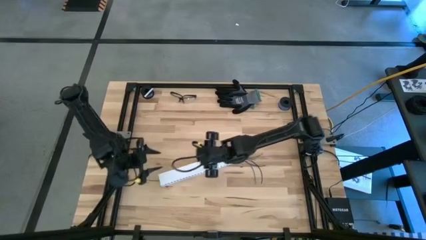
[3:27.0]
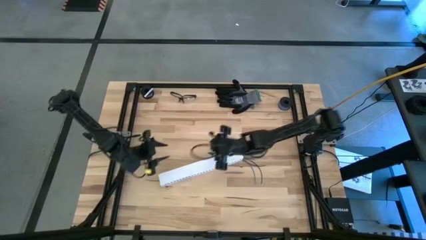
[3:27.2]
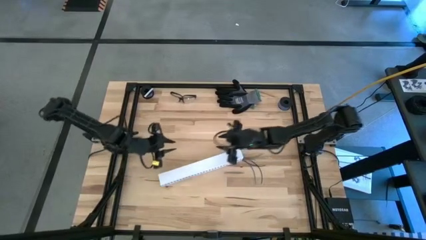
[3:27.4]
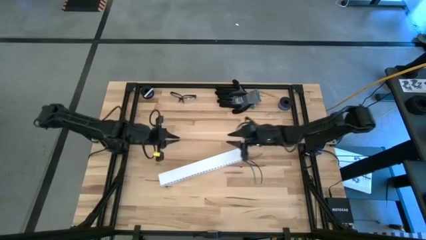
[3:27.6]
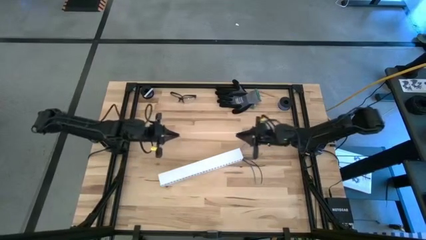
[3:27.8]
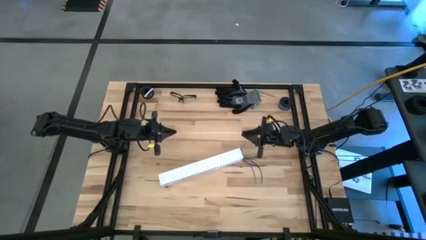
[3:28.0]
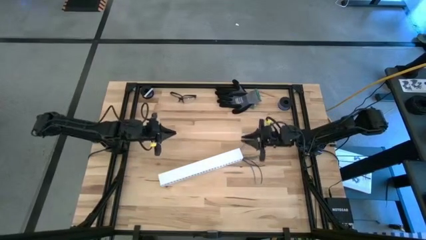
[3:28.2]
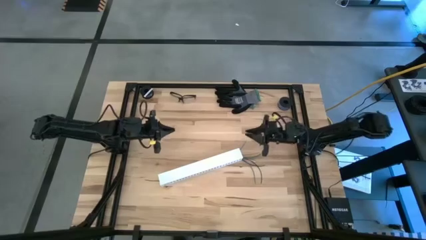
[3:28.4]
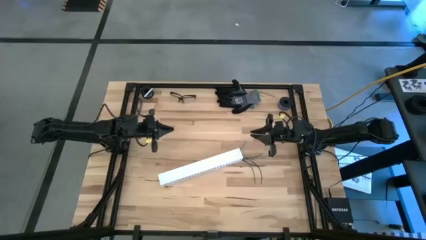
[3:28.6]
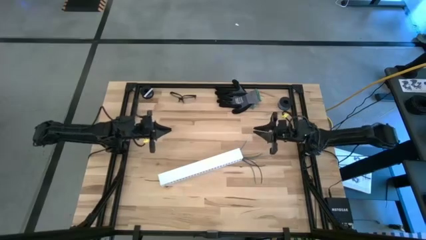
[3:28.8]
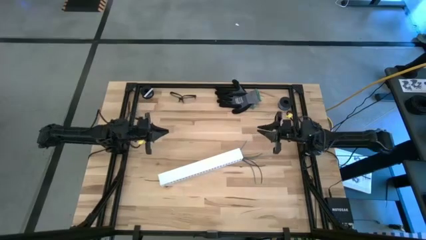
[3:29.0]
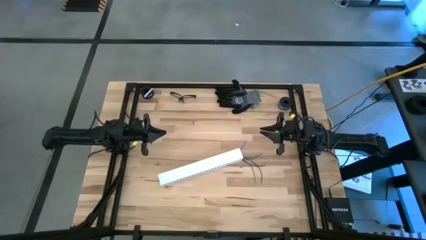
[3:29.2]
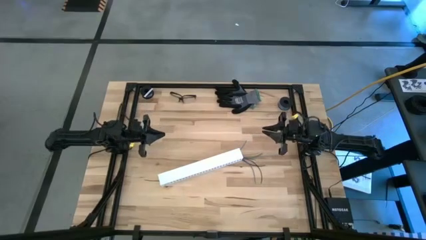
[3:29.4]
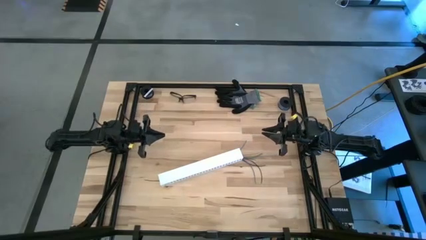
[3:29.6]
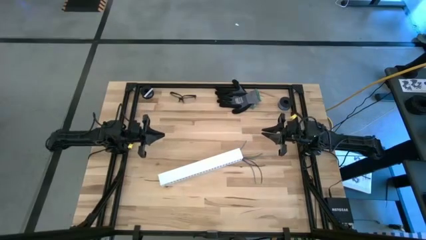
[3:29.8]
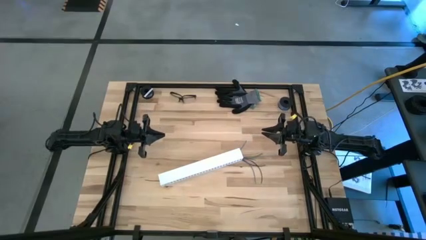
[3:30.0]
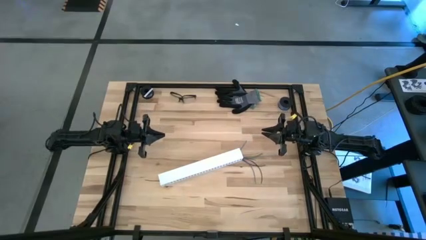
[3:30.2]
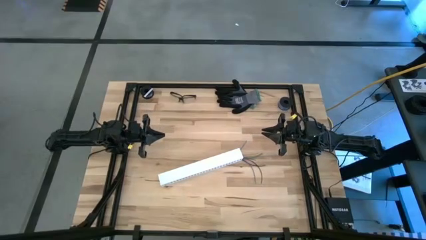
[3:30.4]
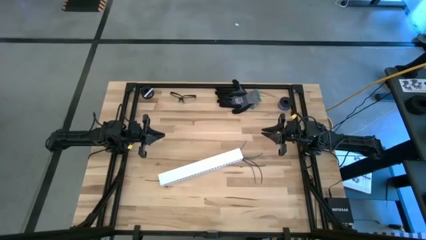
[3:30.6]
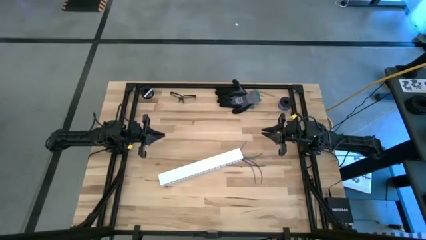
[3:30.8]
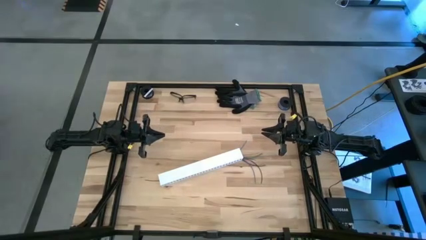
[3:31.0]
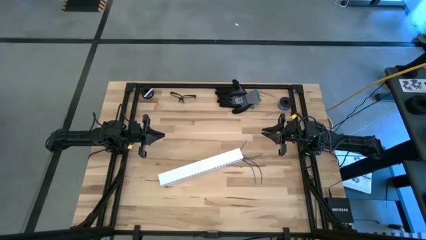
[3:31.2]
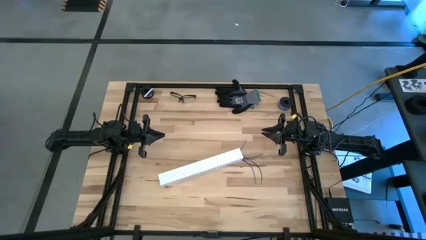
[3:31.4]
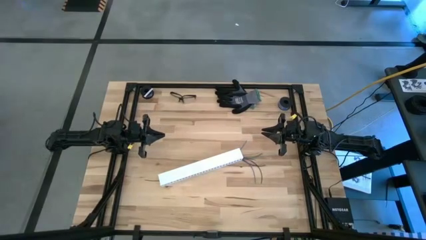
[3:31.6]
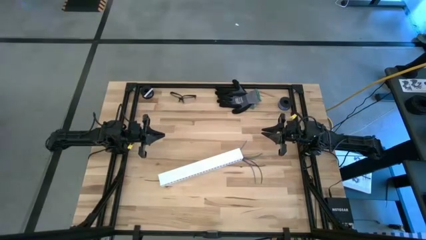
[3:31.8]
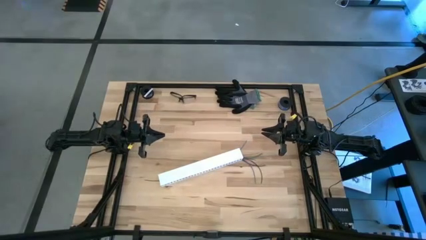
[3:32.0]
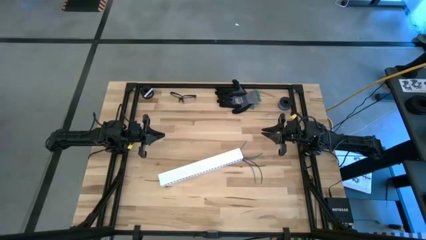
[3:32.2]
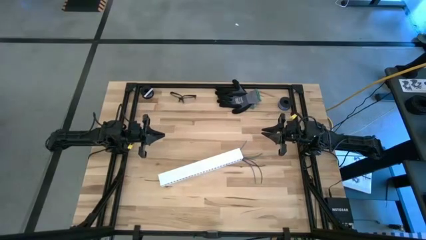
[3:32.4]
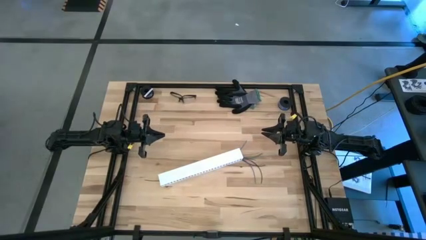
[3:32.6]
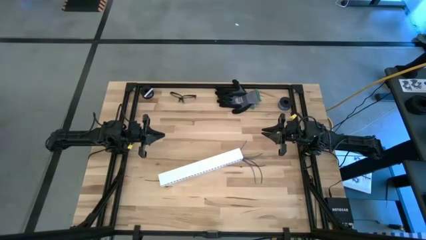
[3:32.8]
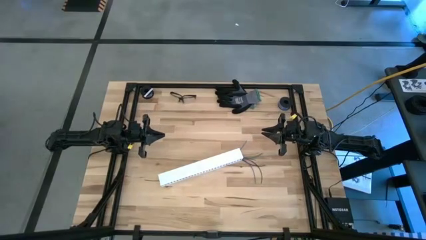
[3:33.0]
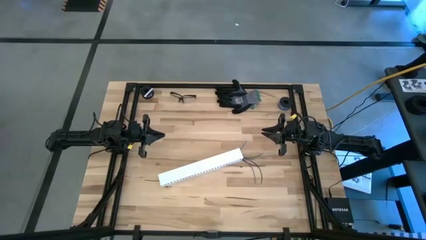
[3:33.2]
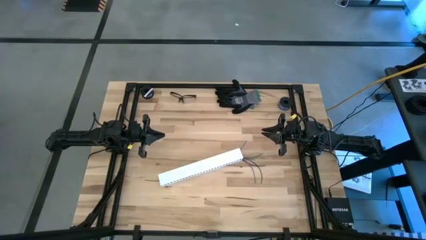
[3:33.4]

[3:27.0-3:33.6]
Task: Ziptie cables
Return to home position

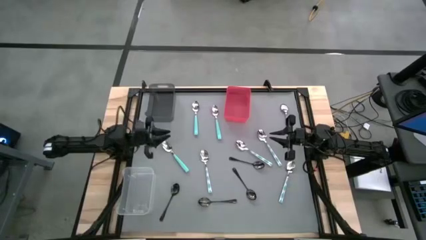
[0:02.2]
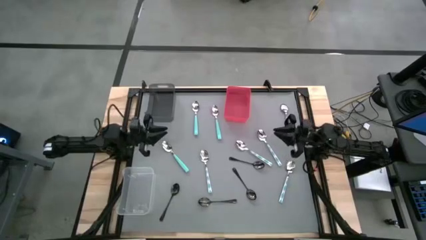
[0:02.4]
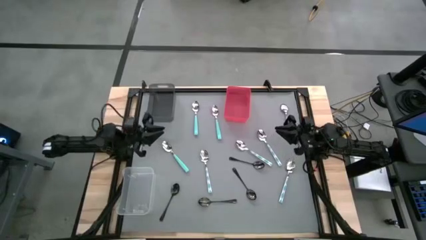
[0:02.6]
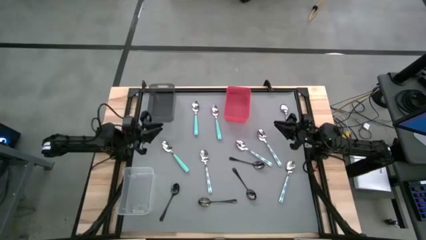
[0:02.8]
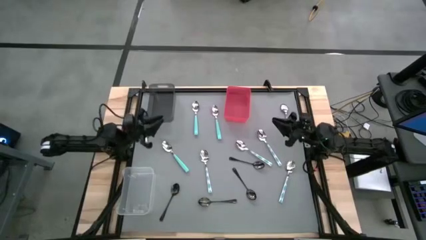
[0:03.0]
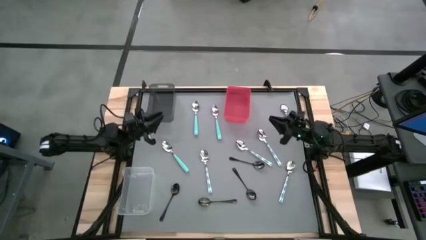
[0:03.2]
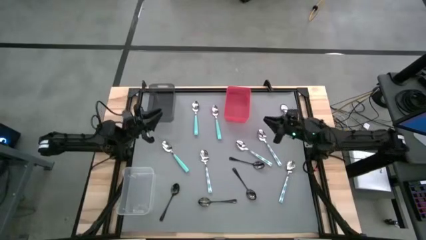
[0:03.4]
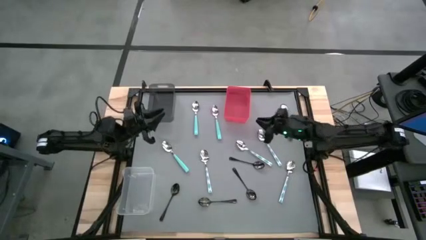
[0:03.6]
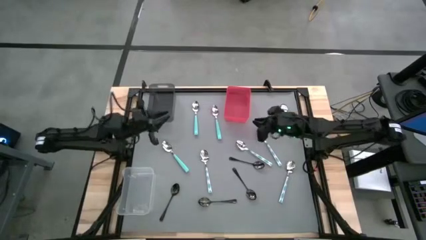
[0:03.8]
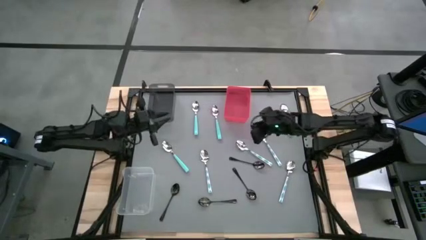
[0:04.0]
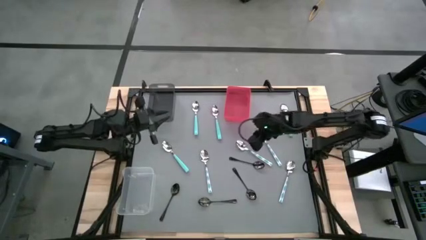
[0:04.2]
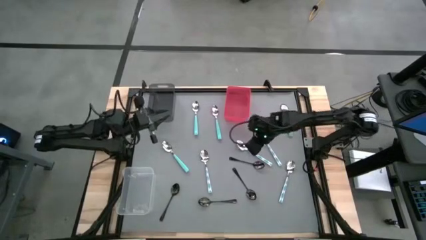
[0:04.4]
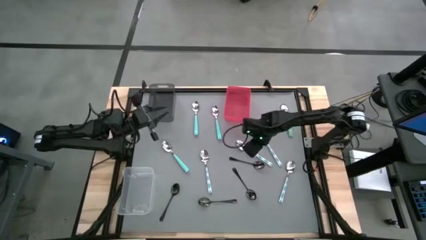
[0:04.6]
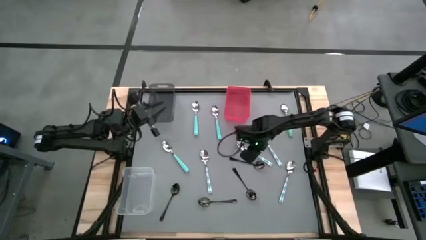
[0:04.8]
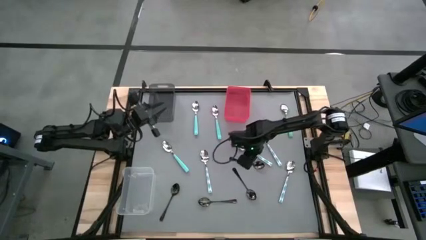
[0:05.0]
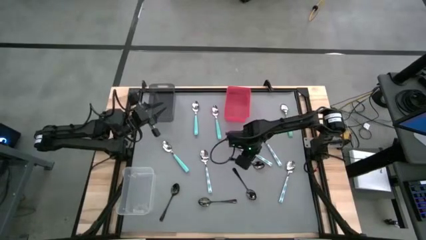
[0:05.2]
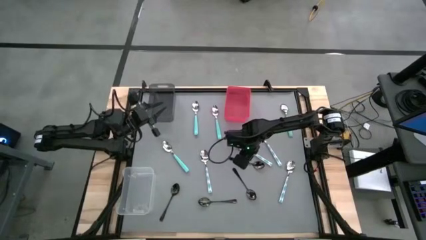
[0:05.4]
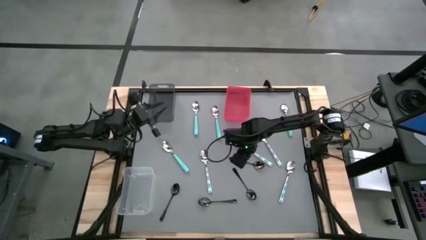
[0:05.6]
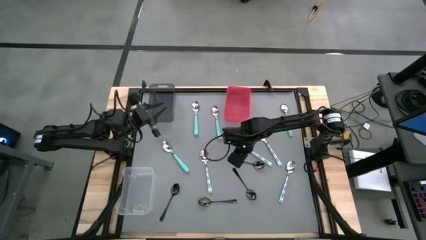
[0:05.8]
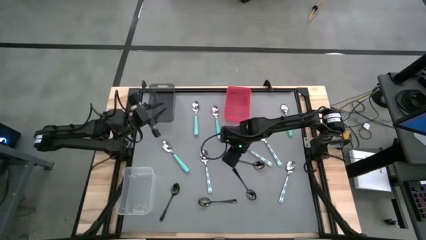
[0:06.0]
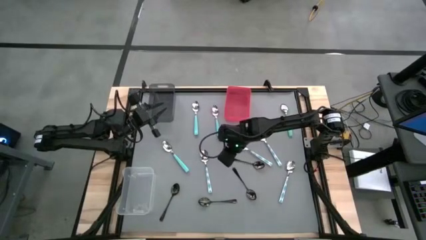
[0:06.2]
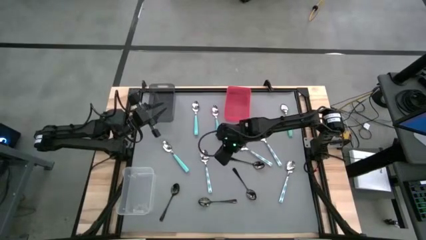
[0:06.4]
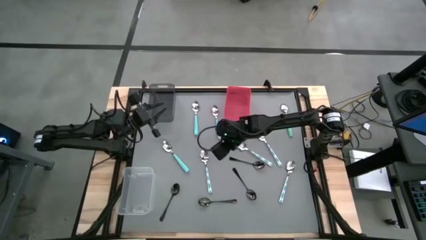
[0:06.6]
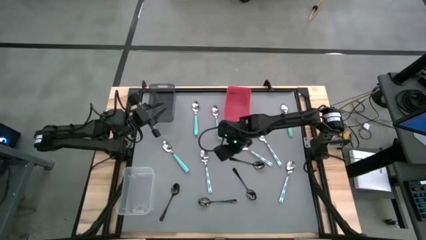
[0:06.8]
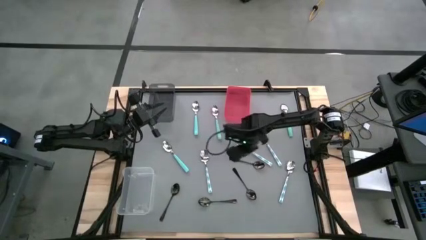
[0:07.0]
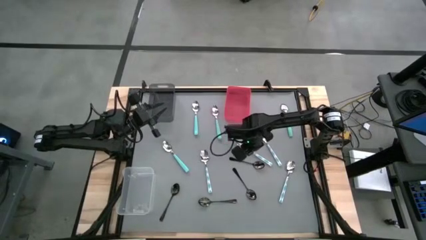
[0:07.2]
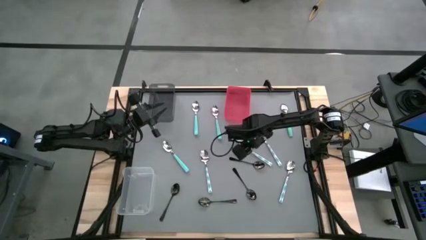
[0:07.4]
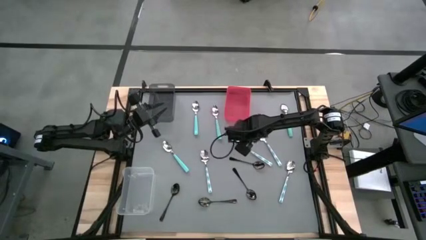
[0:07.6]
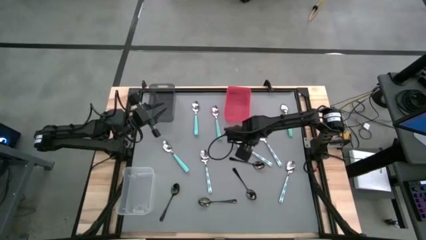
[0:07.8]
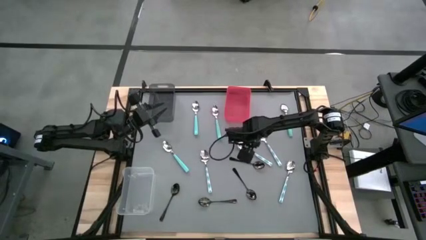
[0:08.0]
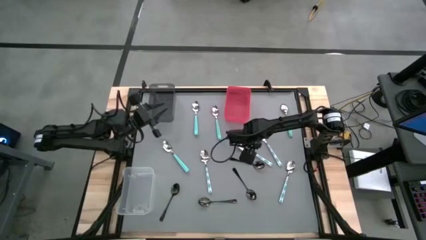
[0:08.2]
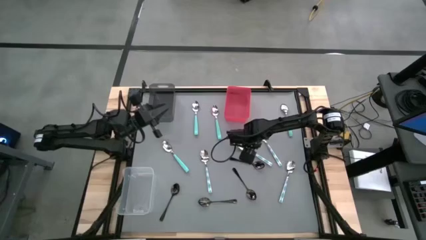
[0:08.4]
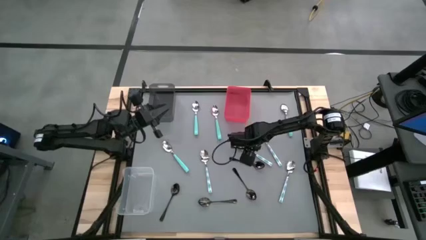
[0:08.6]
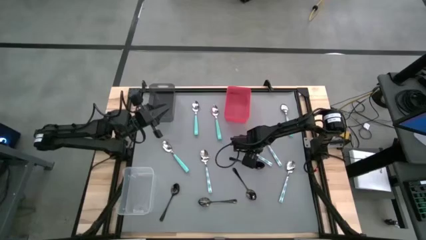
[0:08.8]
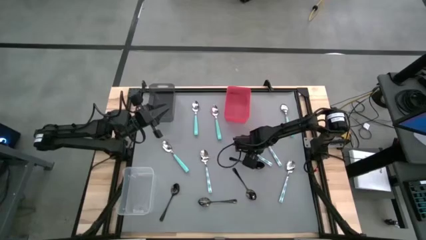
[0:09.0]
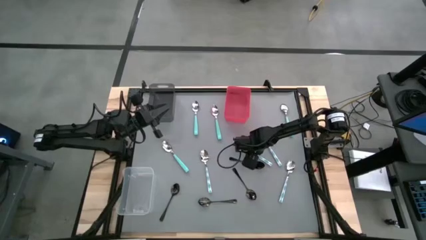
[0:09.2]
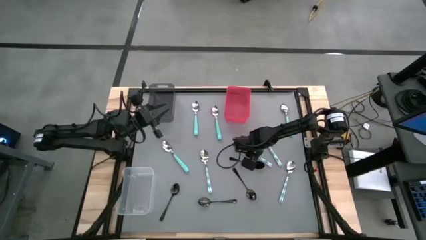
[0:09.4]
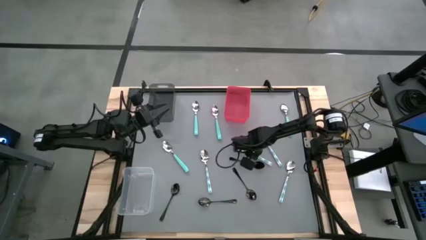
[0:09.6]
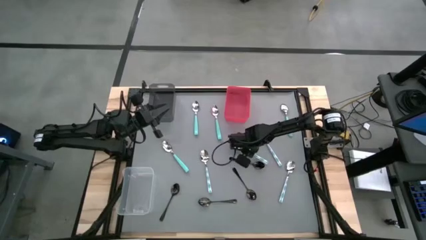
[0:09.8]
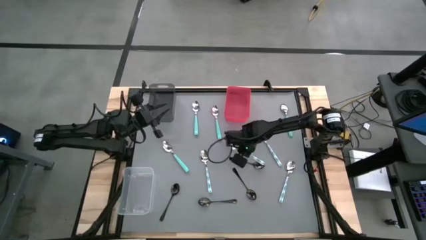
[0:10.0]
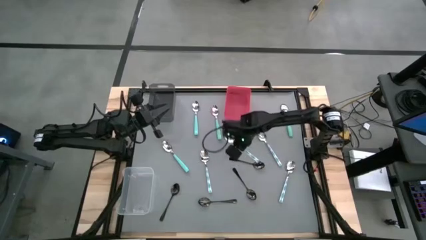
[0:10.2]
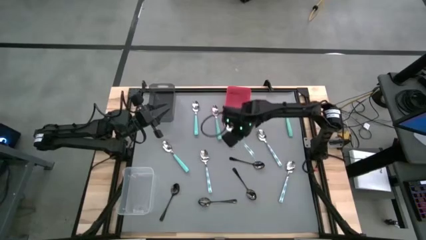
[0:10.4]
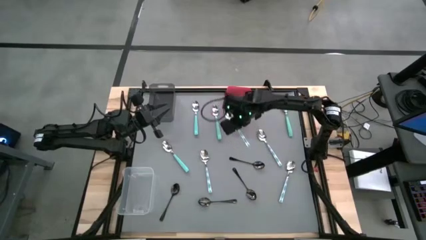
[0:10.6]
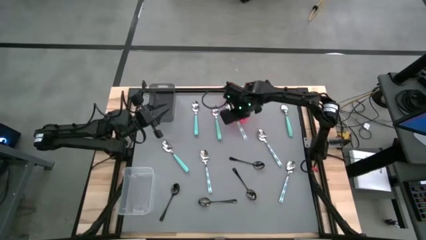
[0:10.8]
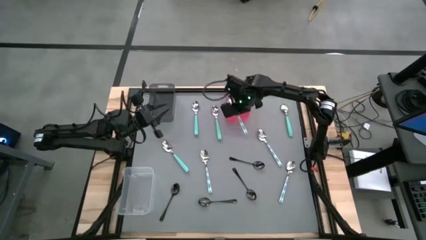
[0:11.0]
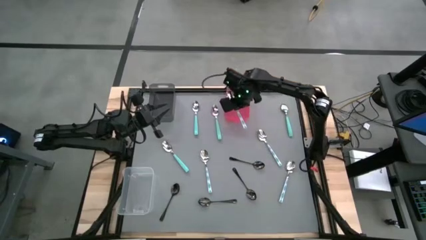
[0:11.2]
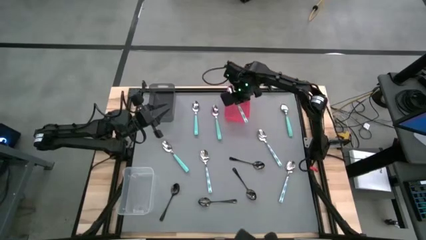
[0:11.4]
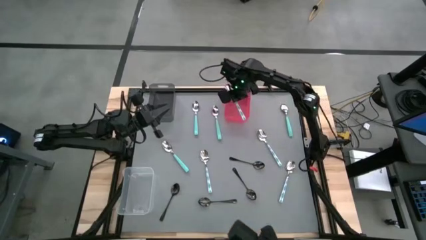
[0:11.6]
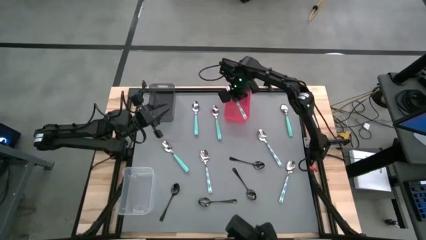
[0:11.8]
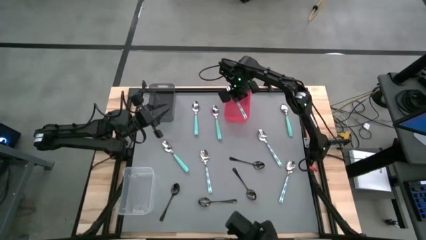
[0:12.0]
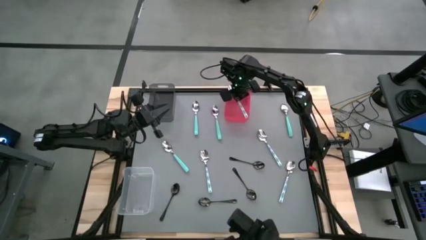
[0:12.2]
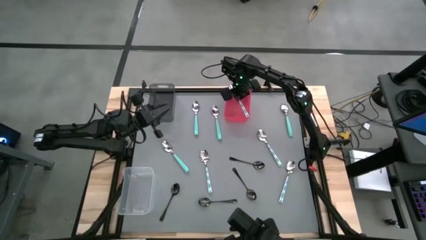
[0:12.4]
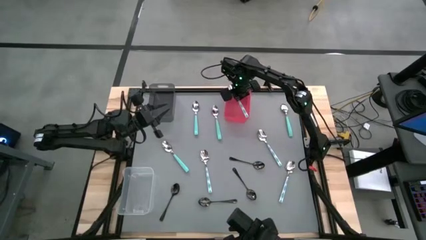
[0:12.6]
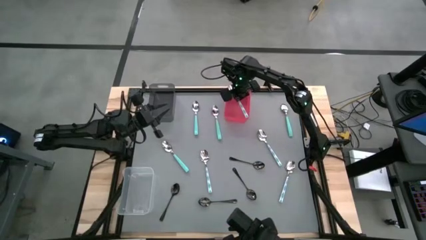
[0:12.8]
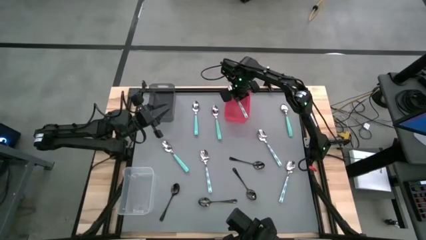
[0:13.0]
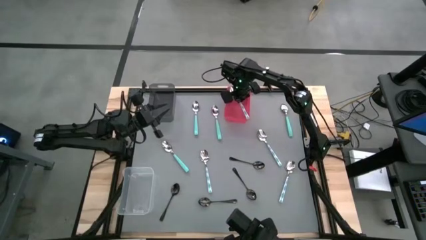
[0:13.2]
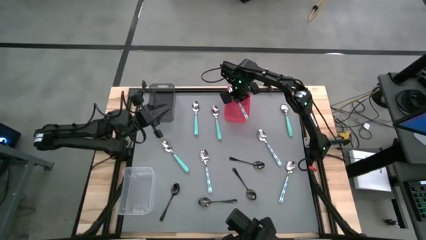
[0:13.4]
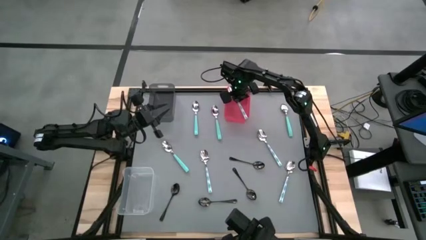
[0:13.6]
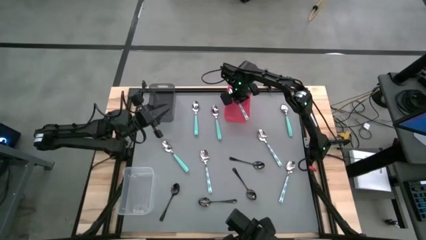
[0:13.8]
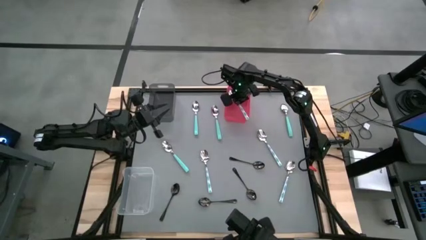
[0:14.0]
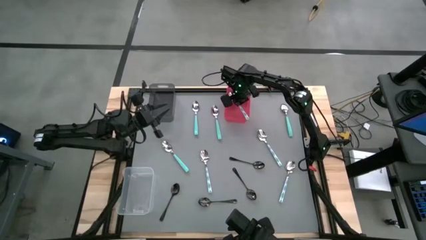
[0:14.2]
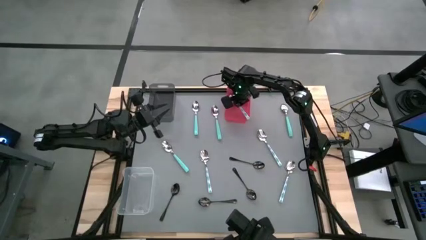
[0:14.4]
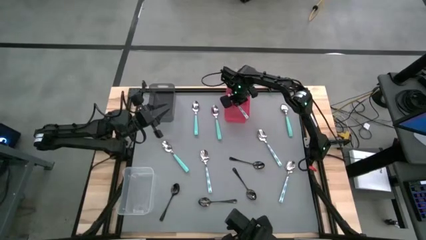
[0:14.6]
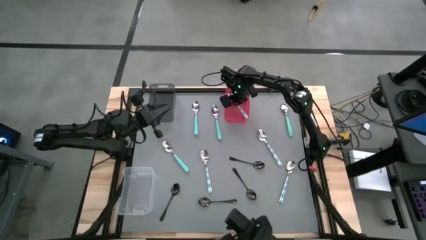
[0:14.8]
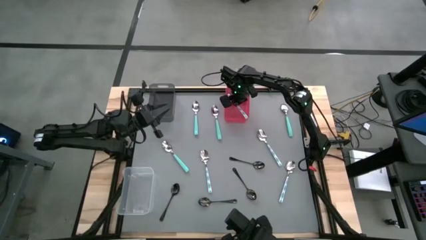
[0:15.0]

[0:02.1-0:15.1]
Task: Sort silverware by color (type)
Put the white and green spoon into the red bin
